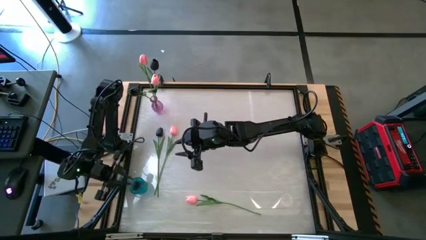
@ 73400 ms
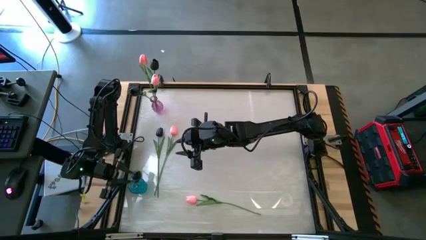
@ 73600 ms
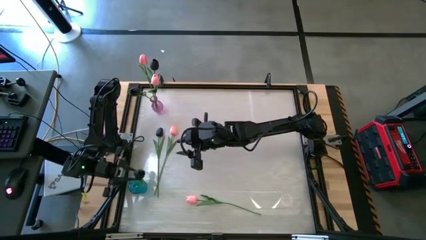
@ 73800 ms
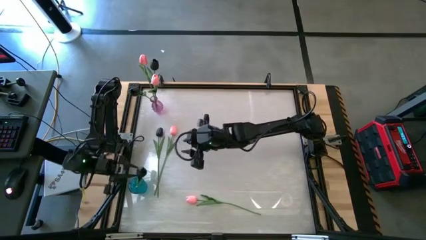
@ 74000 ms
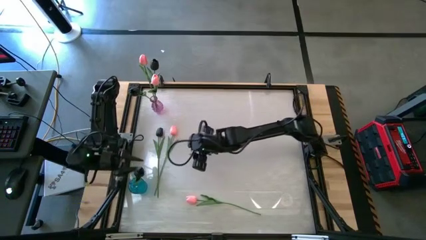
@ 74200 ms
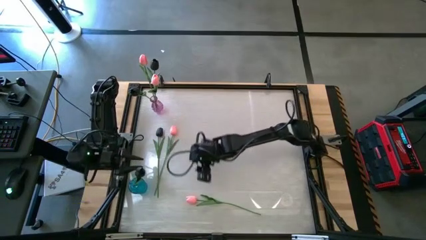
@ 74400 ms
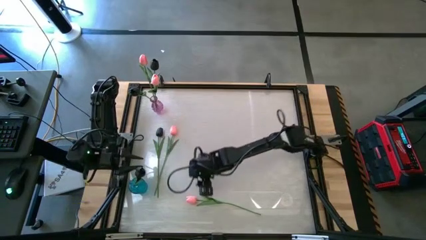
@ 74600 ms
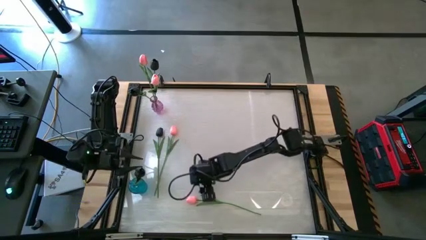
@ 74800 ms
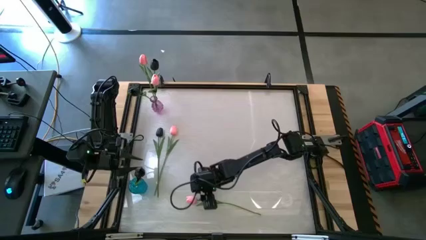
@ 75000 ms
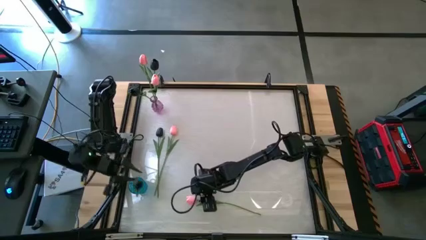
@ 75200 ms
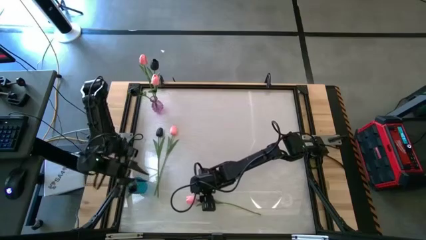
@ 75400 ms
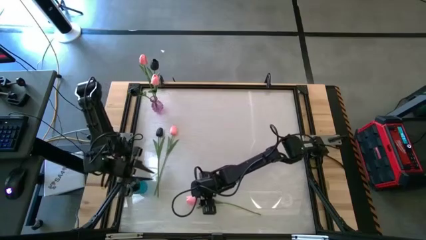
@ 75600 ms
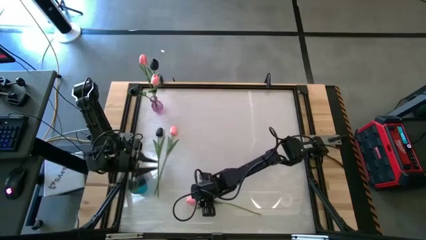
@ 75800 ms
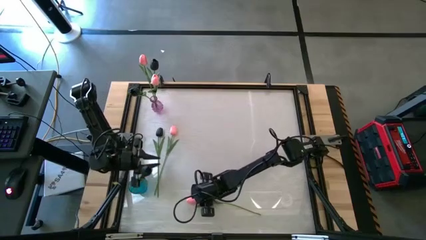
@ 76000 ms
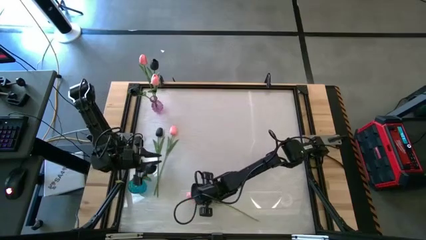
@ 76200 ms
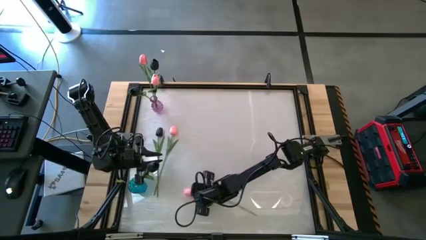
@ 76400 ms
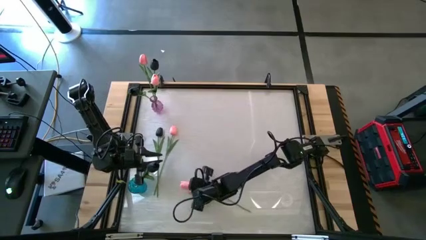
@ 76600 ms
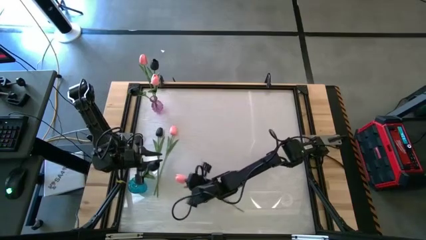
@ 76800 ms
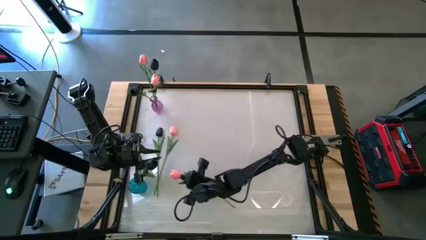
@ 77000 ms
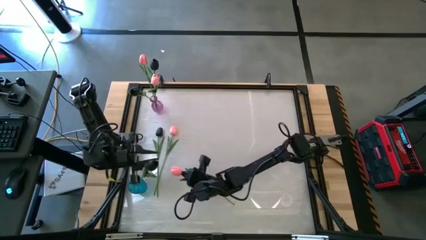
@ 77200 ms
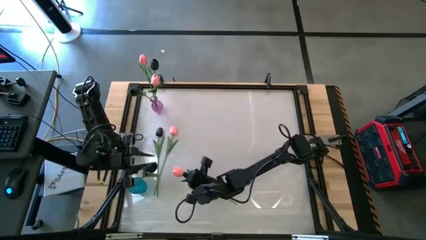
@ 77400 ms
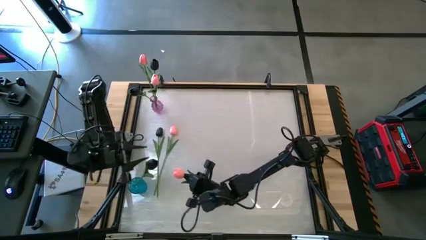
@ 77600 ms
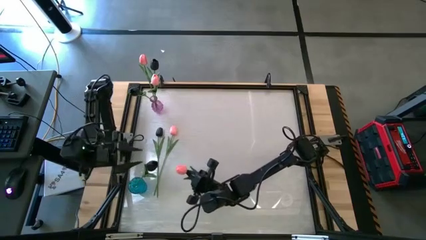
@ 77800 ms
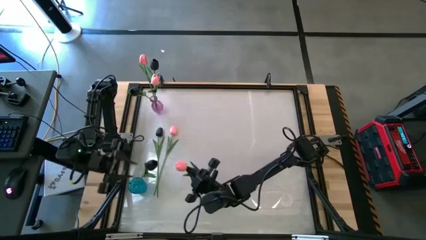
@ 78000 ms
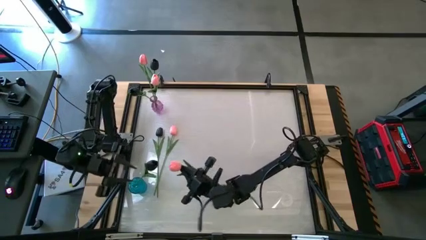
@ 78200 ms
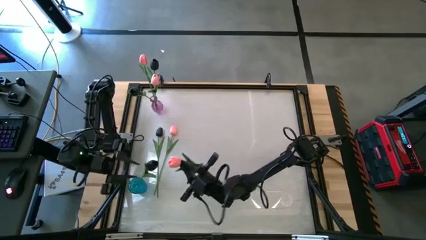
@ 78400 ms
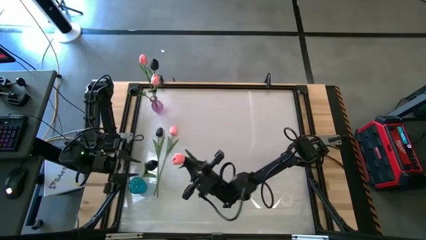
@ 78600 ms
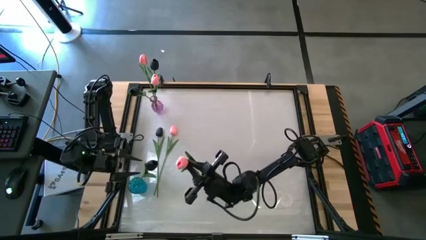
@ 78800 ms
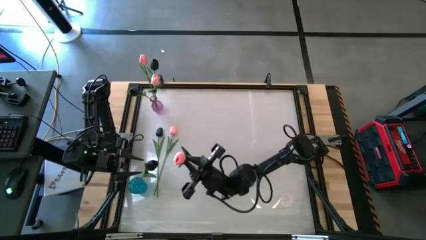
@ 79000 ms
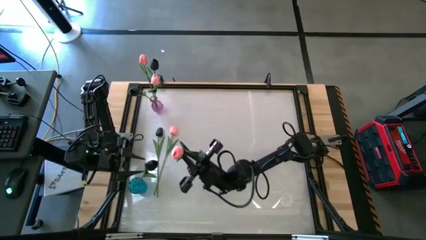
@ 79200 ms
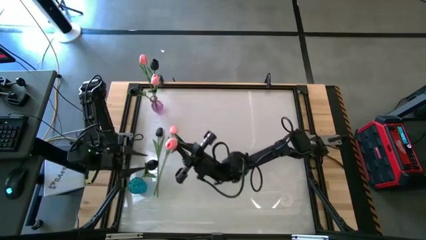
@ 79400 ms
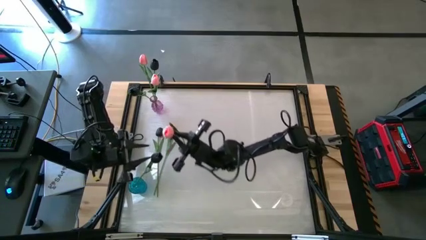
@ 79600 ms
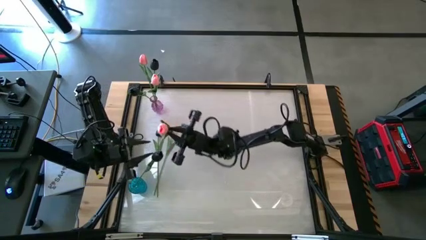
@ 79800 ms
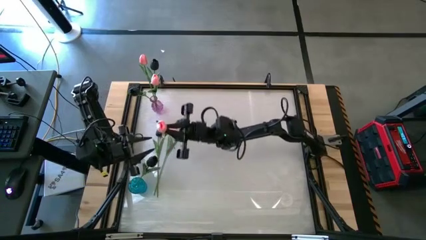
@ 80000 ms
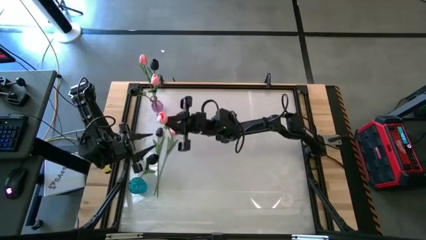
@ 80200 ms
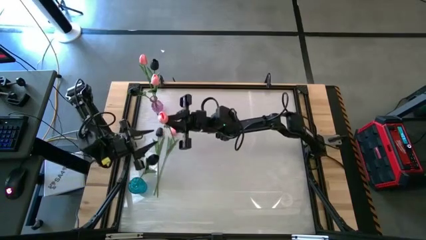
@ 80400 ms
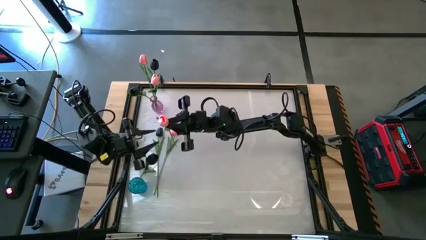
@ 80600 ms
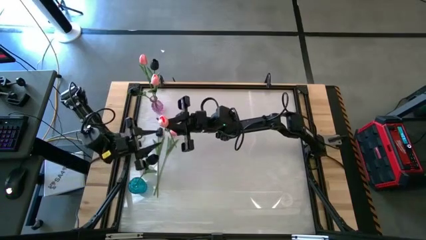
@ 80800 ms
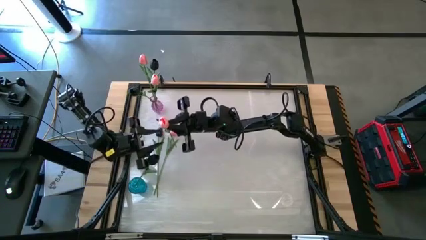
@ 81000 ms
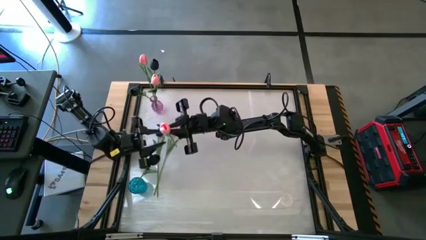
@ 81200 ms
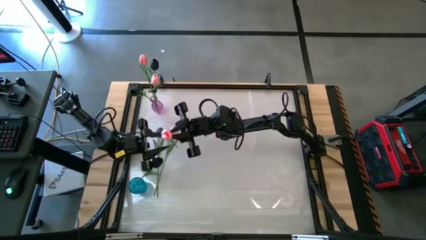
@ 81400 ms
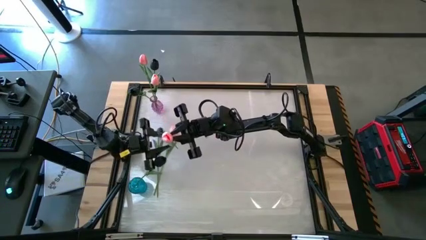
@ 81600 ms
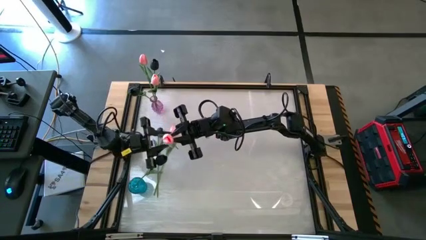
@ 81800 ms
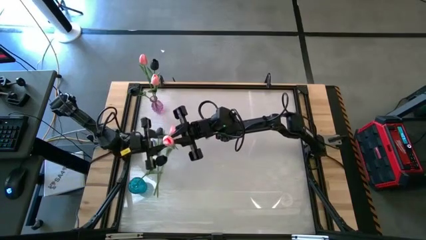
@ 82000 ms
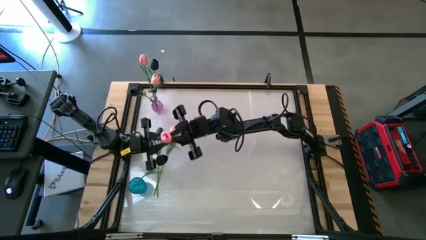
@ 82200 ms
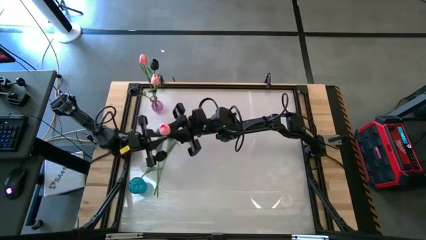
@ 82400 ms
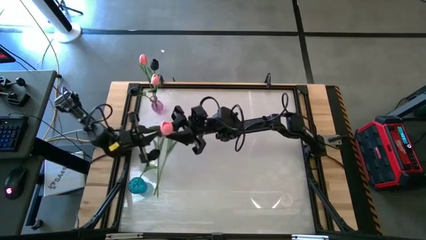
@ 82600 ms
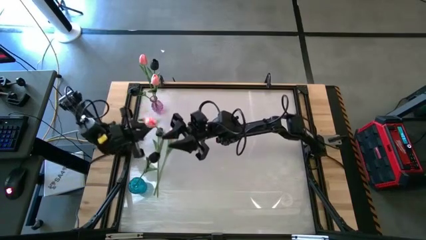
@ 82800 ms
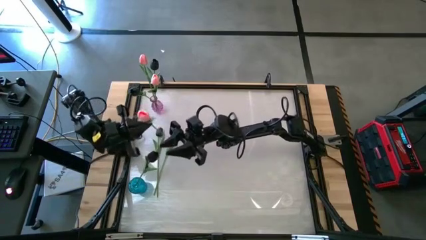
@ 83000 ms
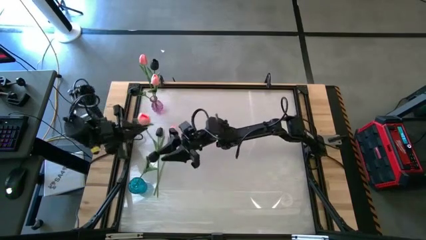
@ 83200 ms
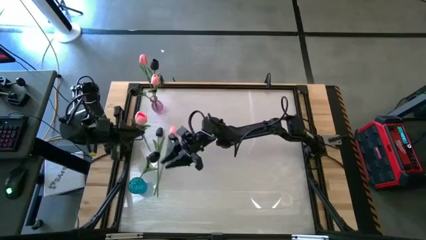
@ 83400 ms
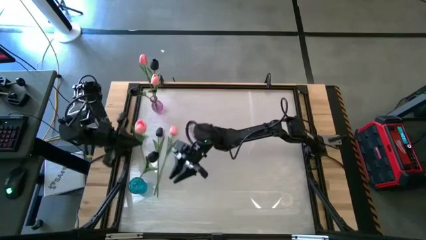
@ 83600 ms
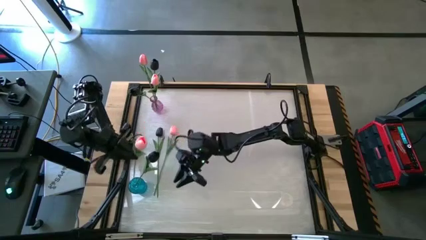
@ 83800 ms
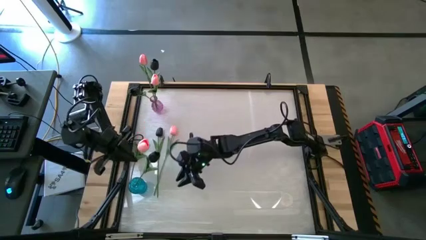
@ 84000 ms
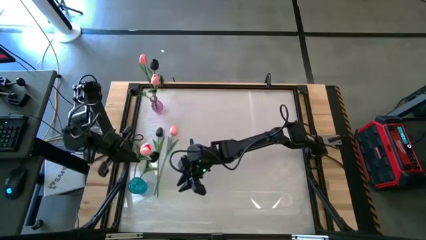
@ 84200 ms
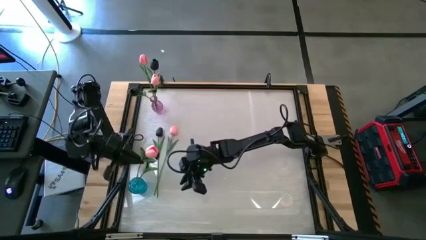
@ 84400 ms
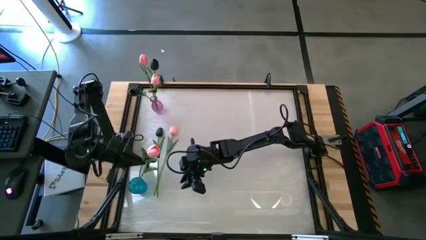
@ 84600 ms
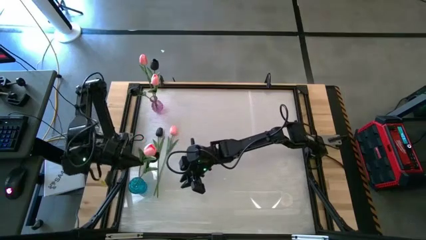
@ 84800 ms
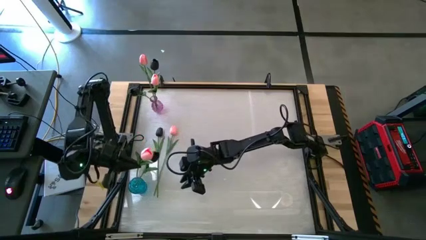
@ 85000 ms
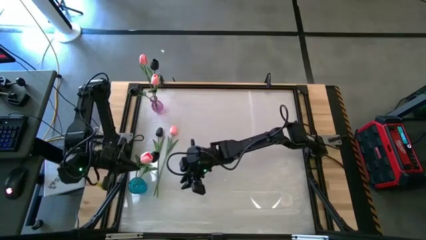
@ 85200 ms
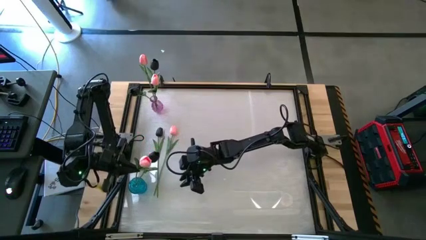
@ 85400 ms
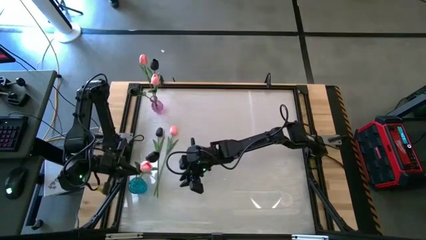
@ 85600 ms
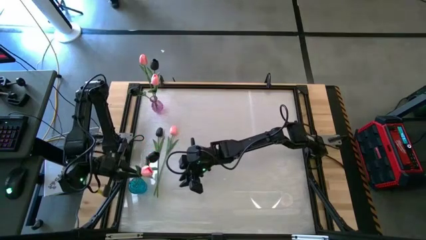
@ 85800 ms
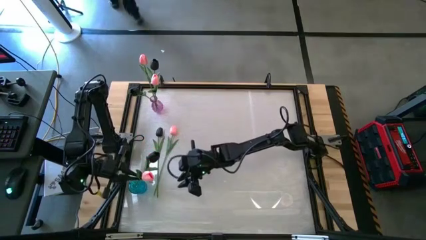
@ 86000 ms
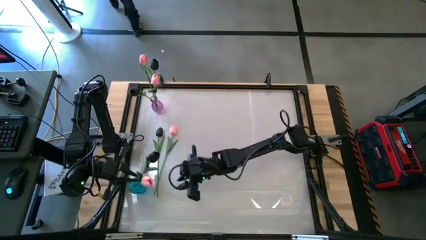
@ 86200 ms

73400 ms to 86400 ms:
Task: Sort flowers into vase by color
Put the pink flower into the blue glass vase
